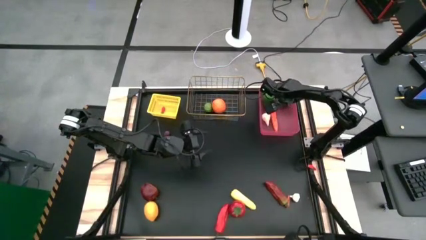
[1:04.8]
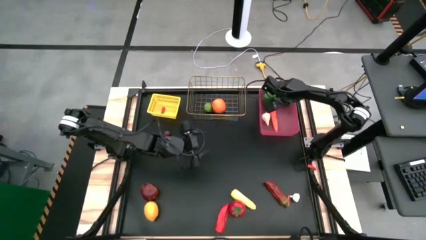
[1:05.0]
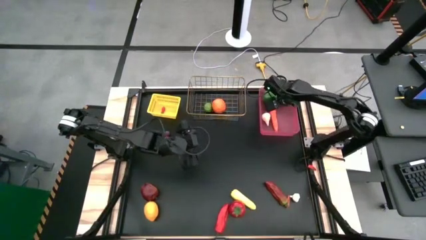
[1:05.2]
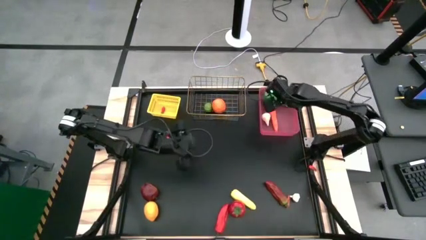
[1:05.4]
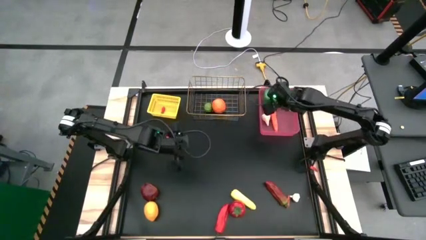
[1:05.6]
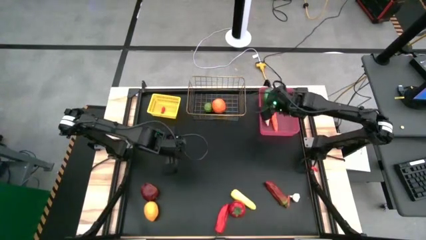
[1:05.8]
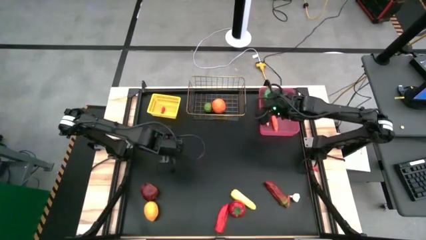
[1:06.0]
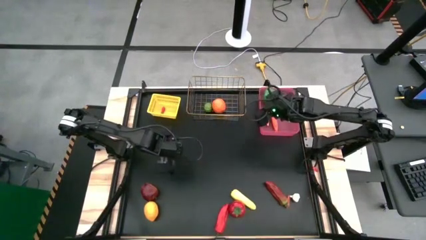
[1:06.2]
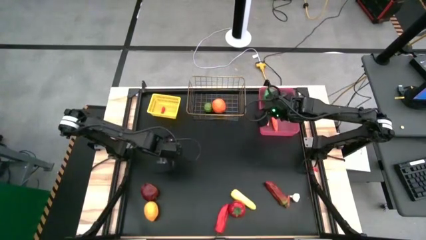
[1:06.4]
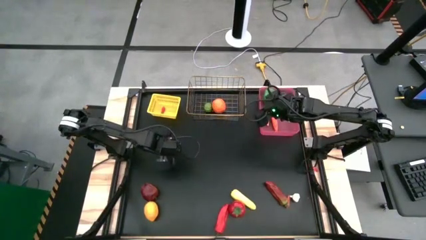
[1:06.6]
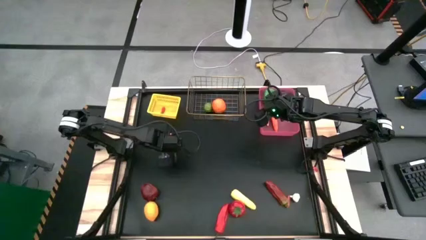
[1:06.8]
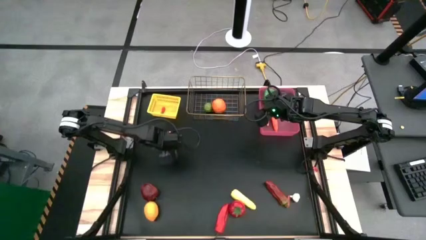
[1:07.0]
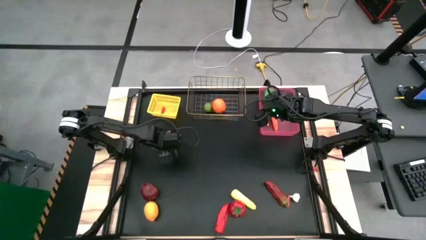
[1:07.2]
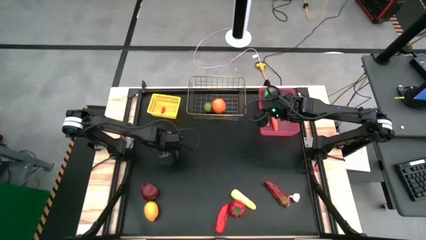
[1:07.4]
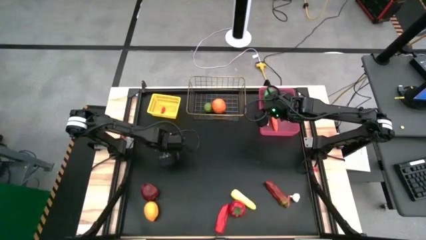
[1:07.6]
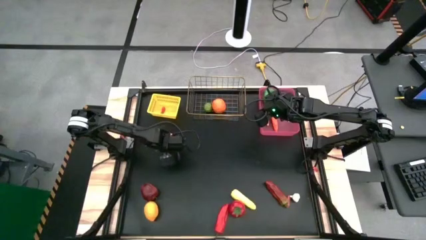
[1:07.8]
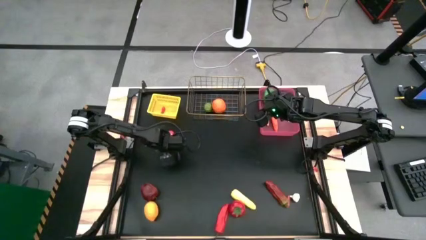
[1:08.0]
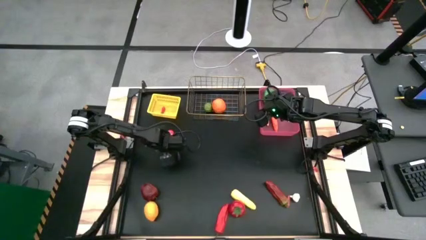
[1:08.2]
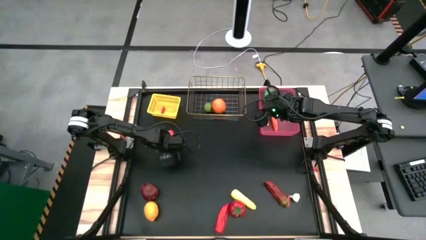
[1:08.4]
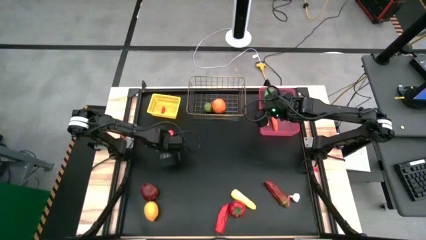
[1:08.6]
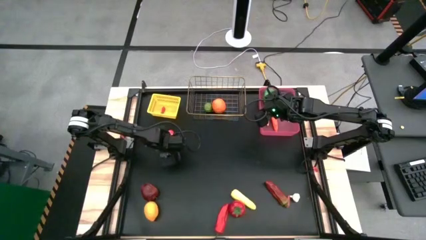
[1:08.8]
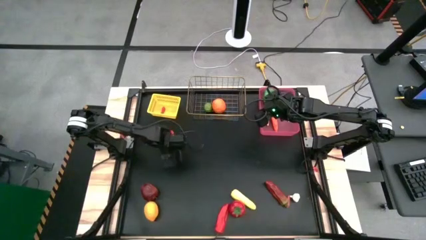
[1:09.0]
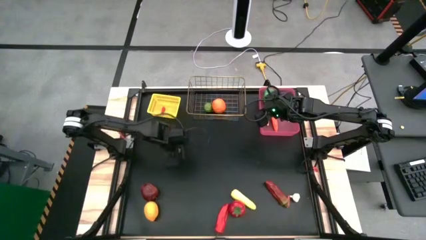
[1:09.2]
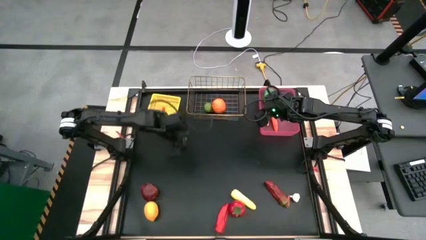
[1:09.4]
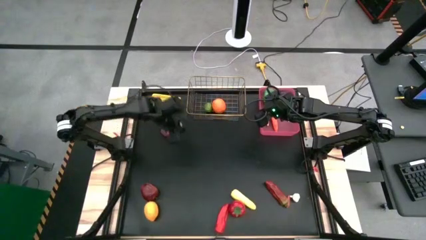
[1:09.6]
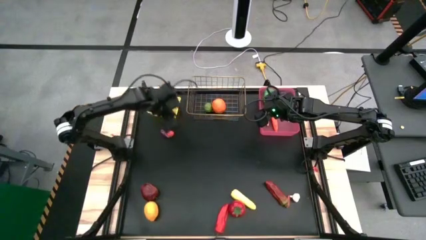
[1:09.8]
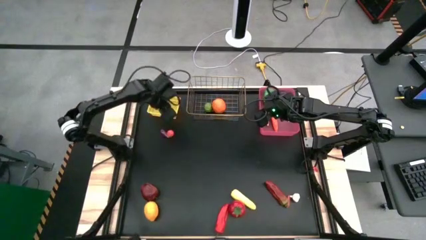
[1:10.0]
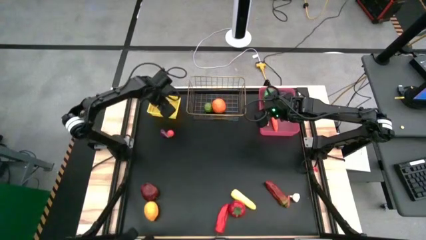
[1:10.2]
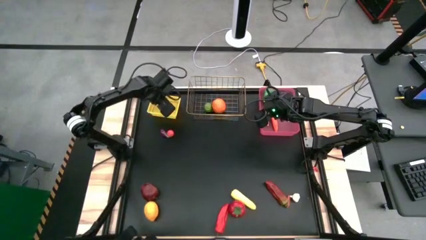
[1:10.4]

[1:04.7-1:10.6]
Task: Sort produce into baskets
Put the small green chili pepper into the yellow bin

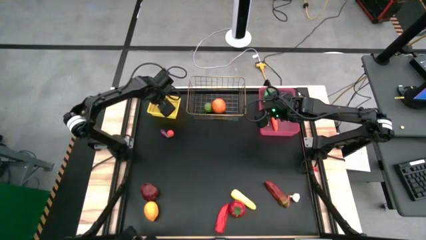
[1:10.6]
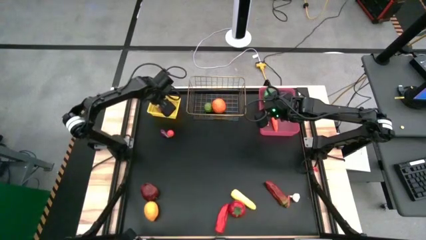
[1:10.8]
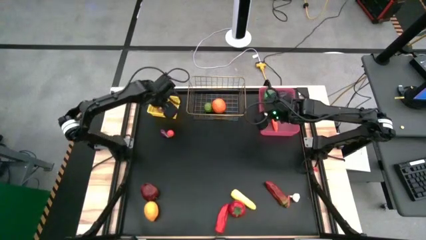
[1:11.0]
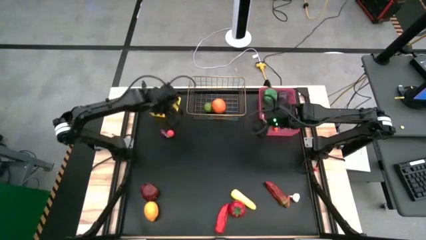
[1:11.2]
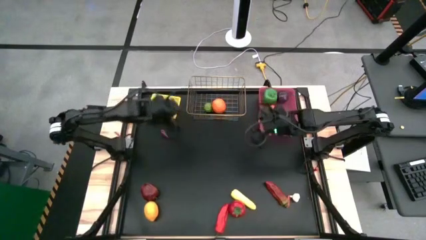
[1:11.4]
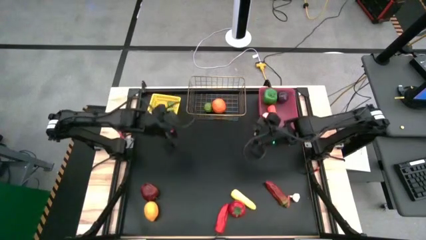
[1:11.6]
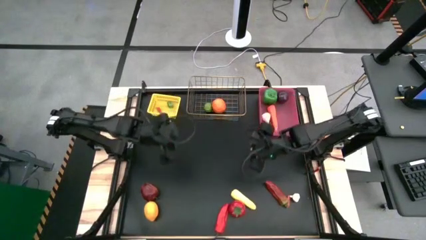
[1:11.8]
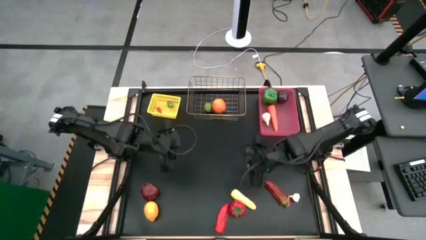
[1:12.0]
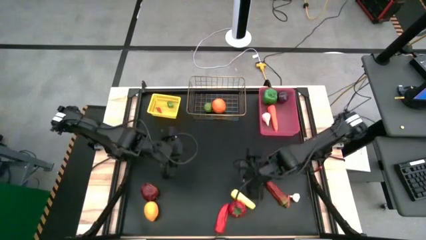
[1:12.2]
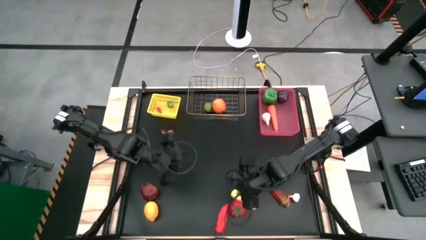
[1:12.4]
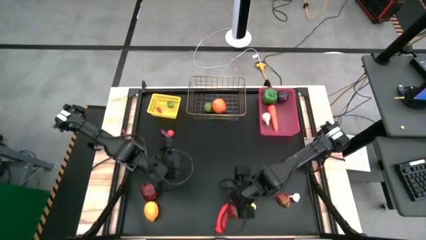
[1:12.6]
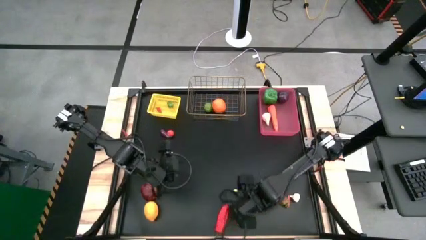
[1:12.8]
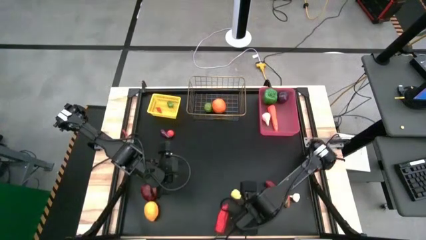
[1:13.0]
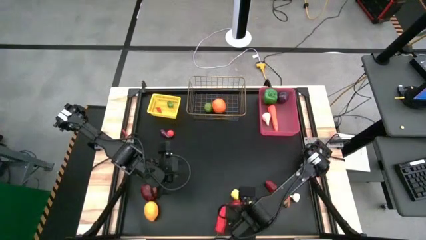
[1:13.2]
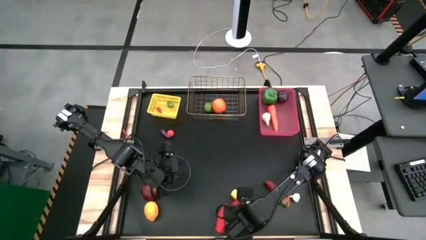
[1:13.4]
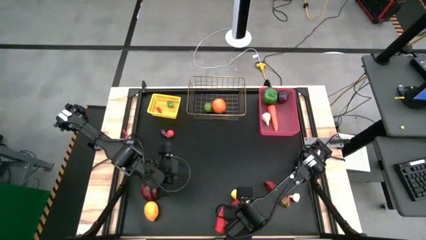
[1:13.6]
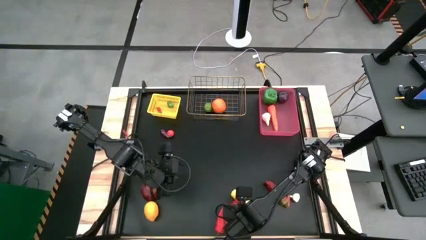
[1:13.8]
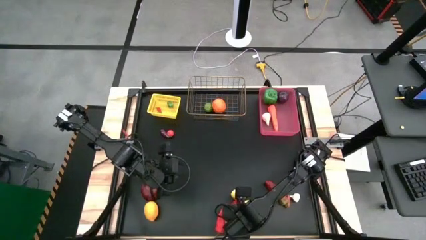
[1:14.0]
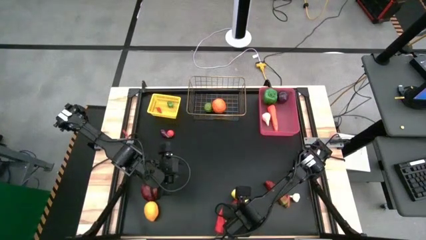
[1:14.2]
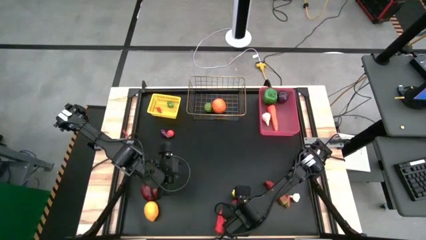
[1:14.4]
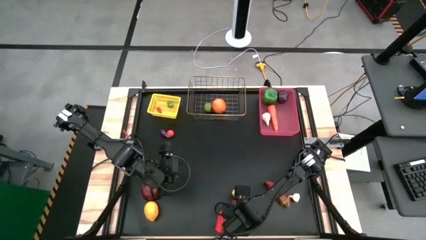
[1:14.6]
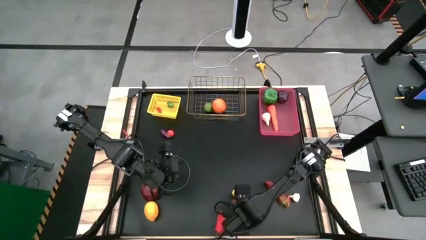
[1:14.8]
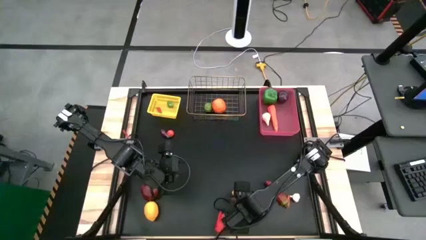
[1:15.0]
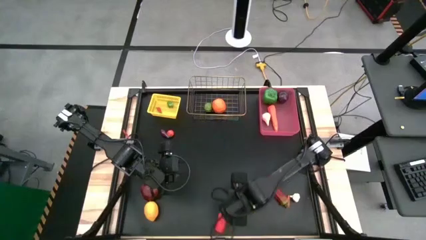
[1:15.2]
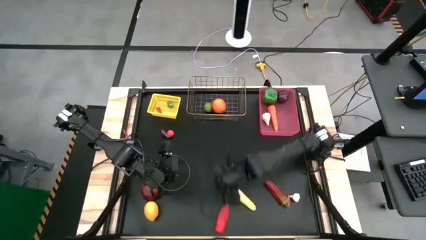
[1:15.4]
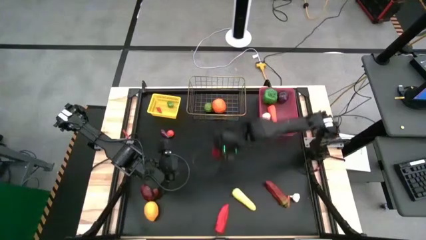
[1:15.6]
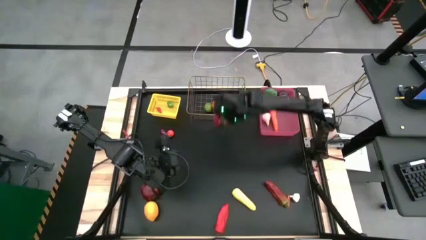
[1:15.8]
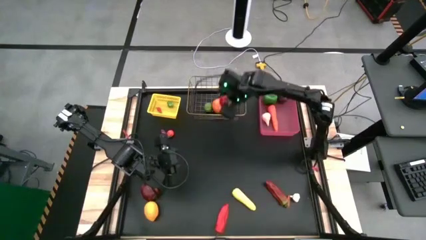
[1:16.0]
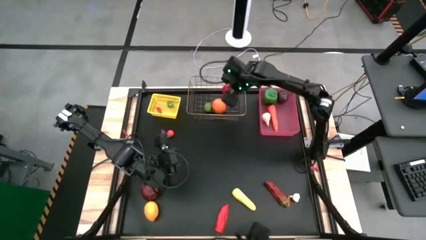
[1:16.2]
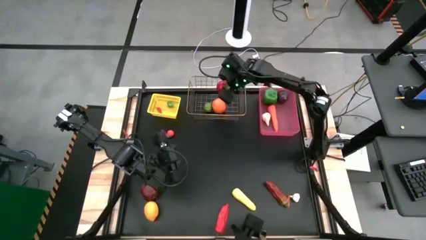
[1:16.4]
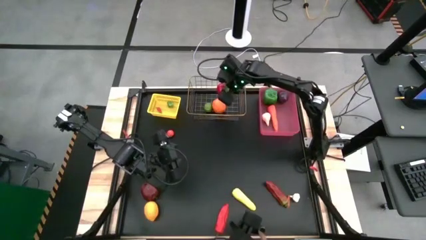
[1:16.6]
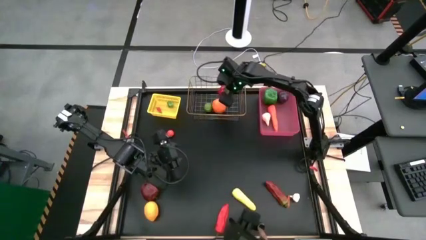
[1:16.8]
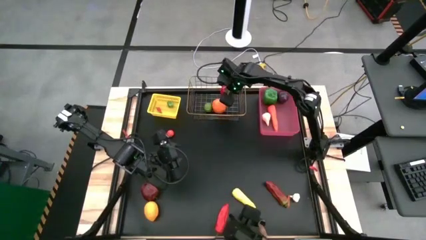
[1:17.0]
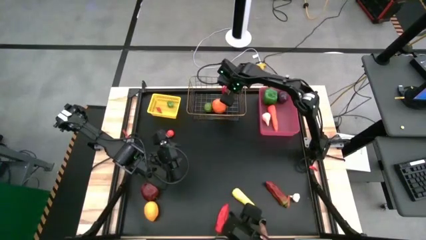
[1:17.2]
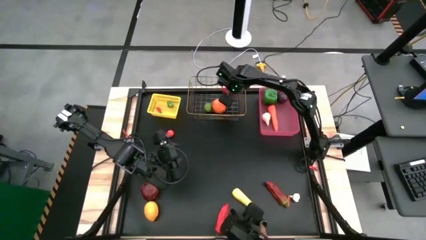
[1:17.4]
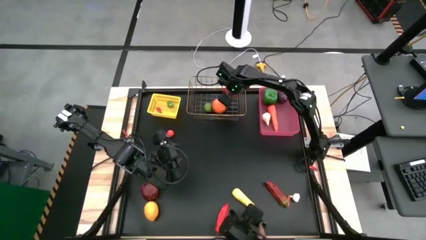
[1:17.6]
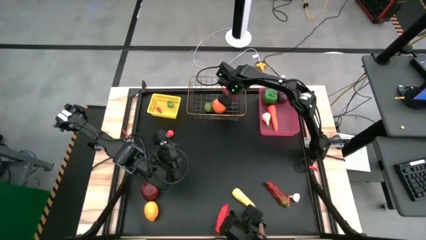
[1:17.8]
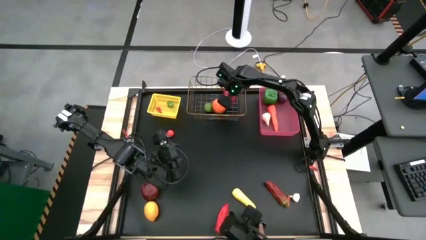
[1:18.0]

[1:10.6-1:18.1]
Put the bottom red tomato into the gold wire basket

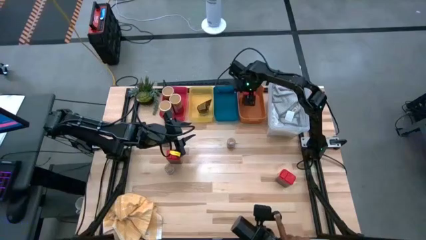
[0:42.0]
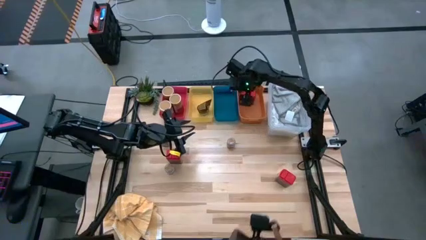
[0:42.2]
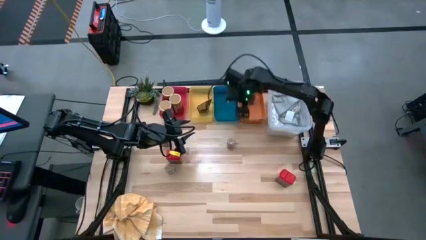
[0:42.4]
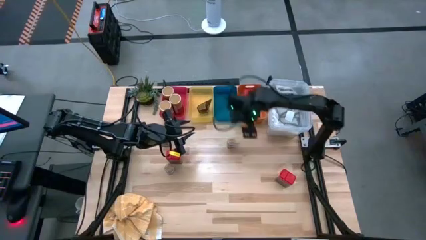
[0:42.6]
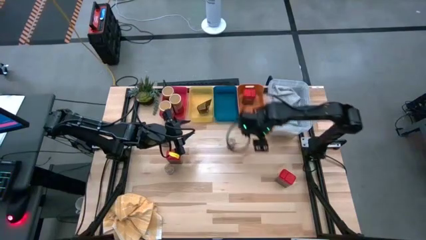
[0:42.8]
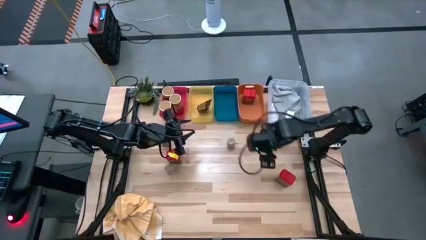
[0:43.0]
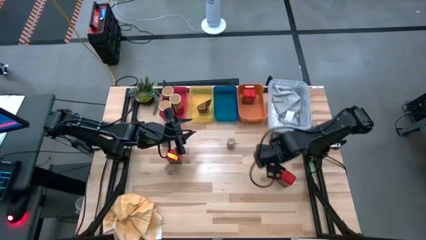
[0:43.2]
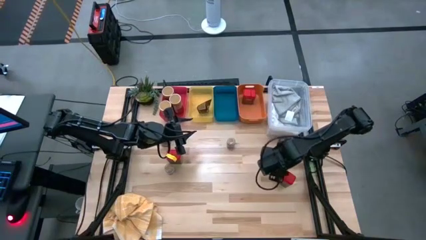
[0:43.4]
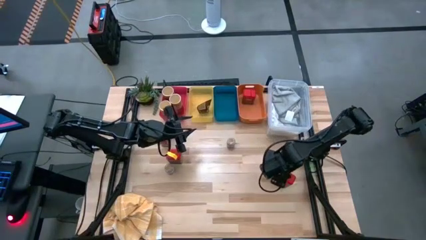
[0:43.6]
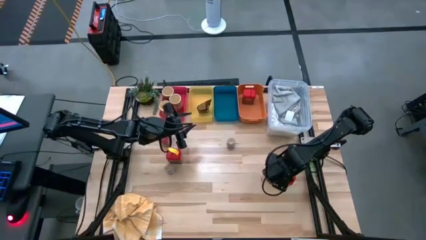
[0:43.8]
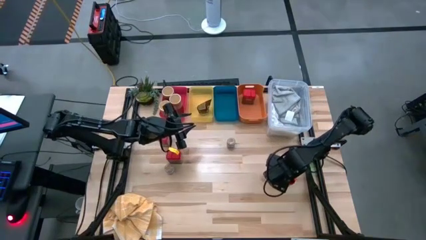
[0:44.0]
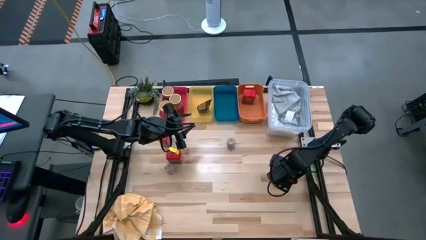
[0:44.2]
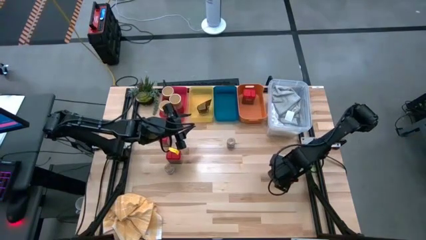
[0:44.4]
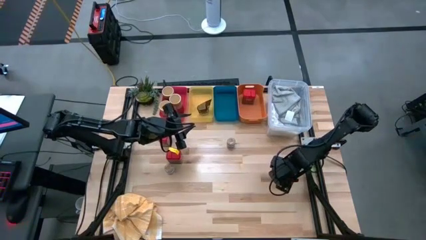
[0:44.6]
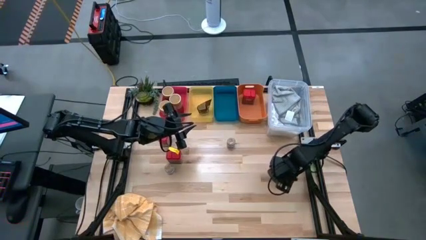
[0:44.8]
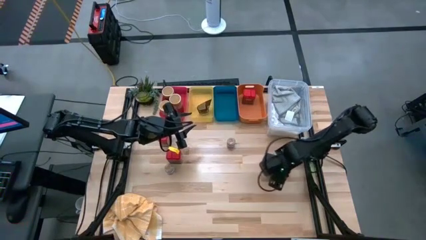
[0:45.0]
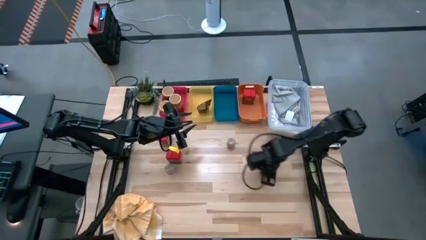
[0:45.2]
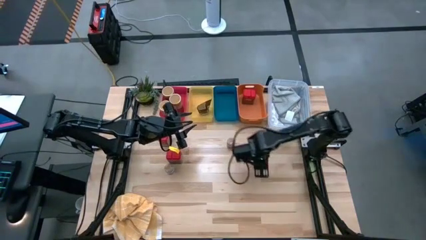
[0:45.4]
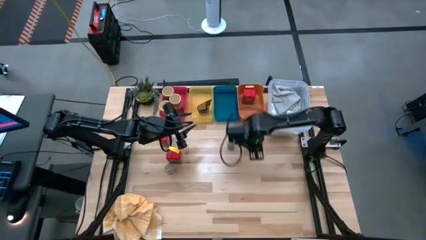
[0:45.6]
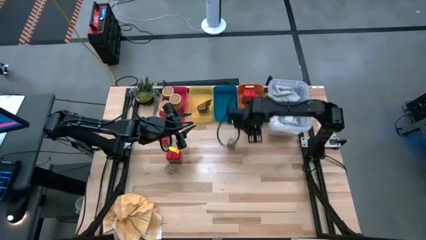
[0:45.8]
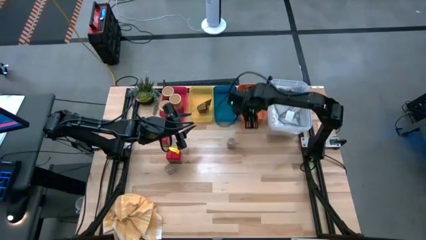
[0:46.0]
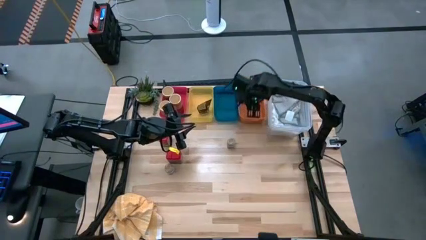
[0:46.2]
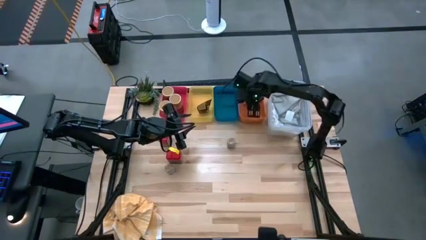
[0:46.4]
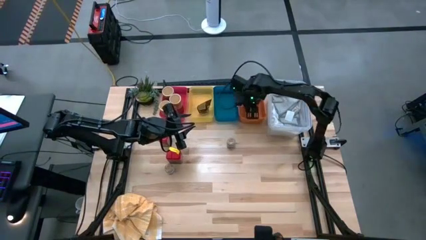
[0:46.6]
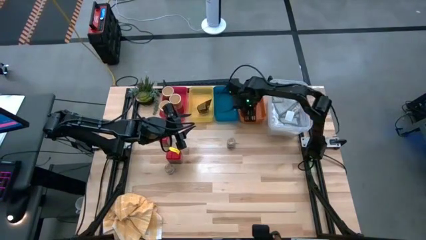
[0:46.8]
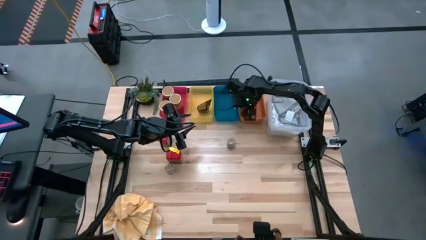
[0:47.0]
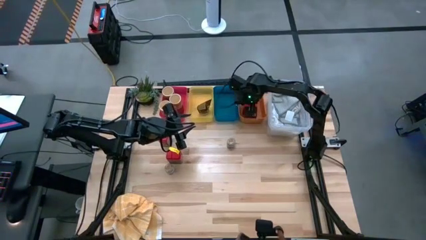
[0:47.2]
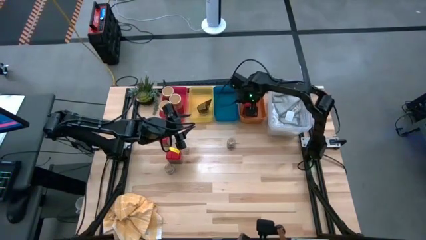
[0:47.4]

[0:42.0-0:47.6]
Task: Sort spices by type
Put the red spice can into the orange bin
